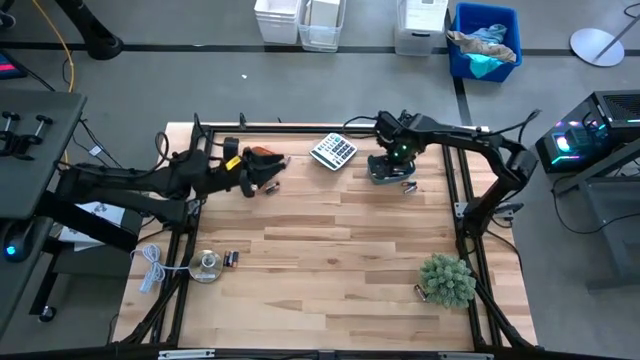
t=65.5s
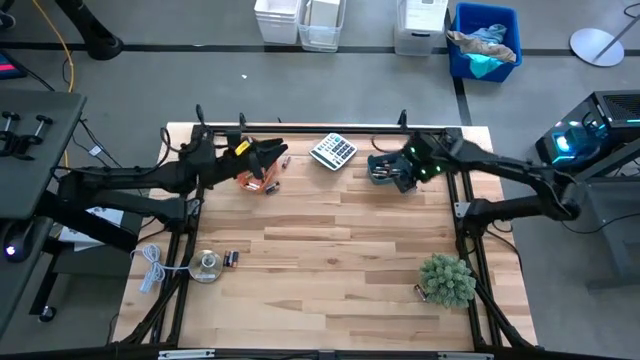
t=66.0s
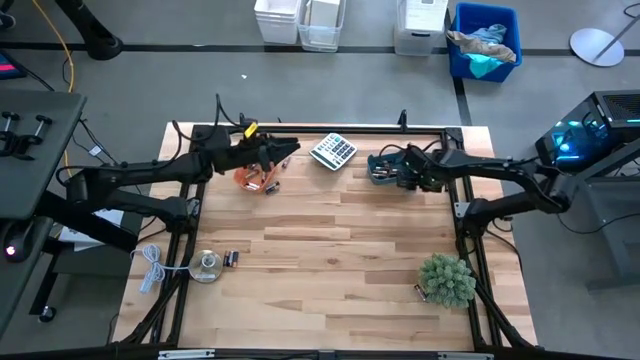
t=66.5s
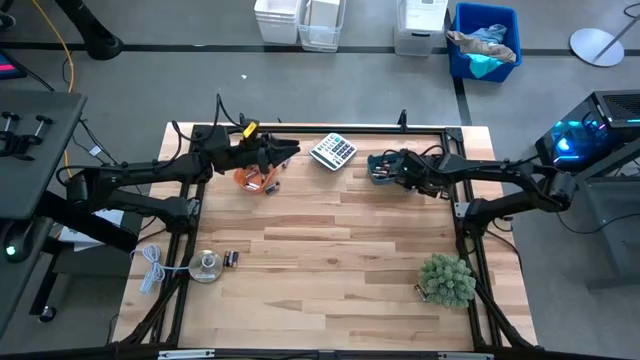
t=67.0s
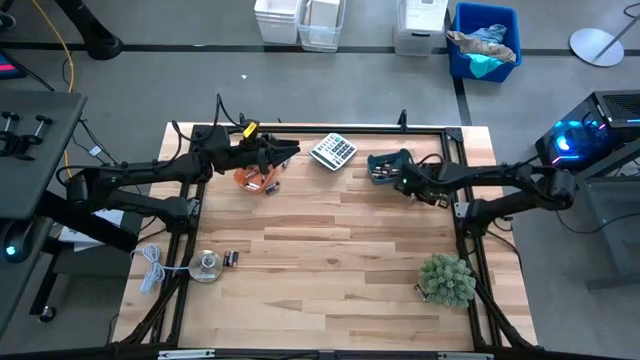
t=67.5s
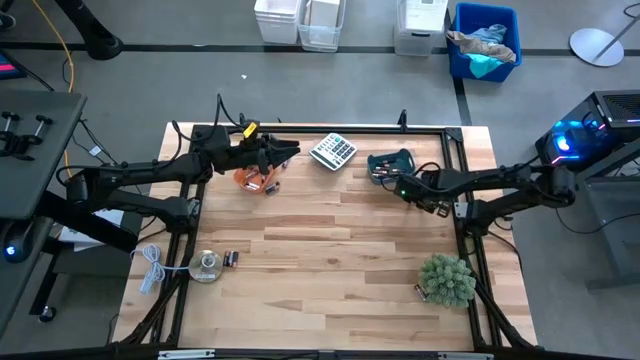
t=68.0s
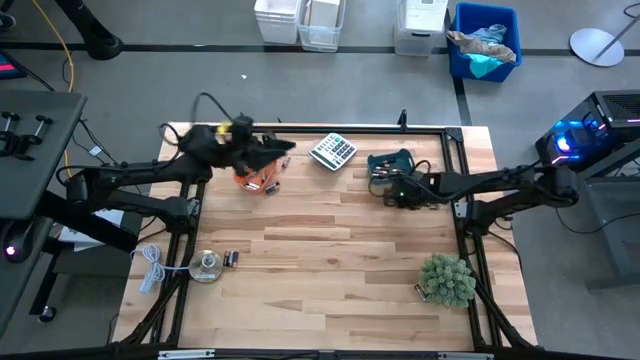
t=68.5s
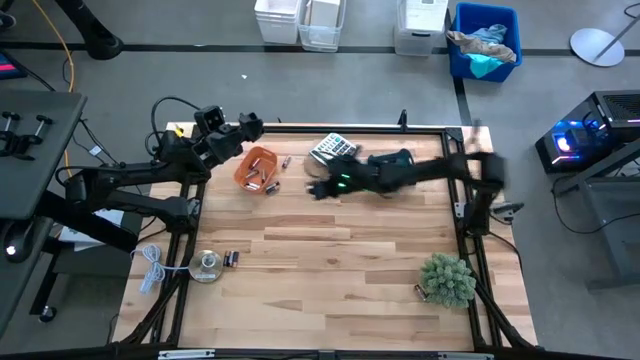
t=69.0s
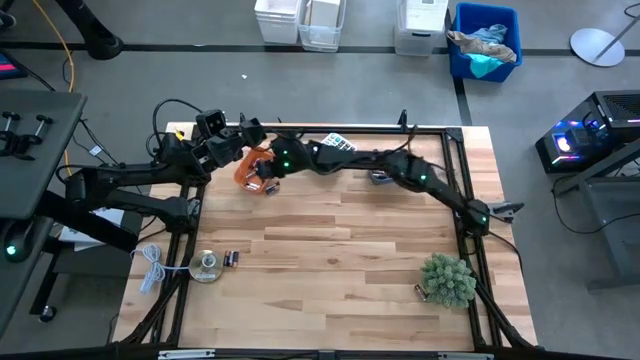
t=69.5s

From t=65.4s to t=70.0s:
Task: Sort batteries
Put the silver battery into the orange bin

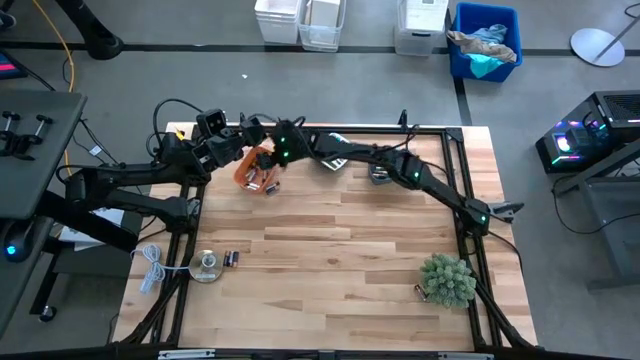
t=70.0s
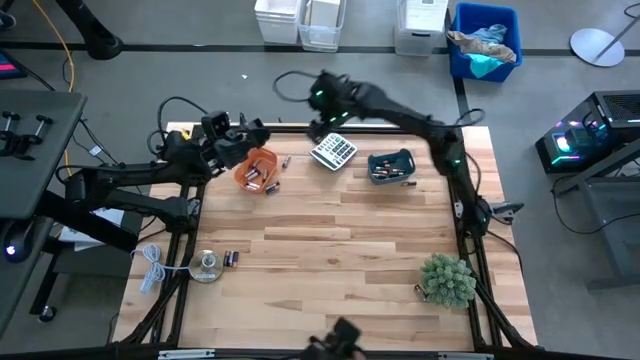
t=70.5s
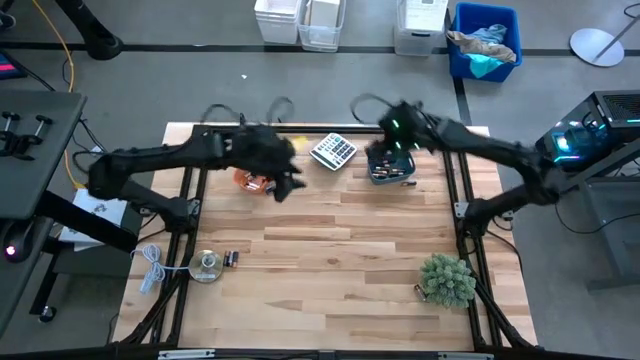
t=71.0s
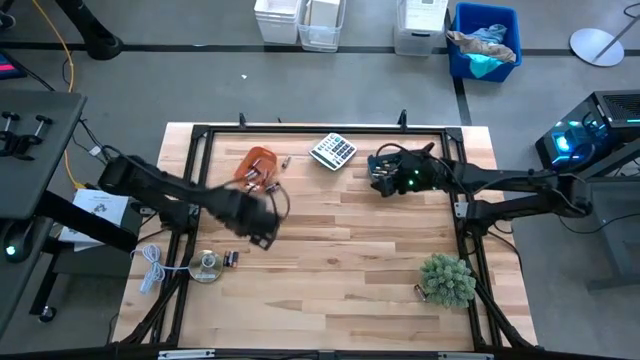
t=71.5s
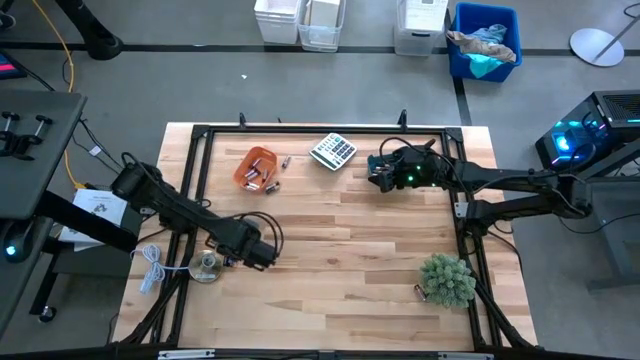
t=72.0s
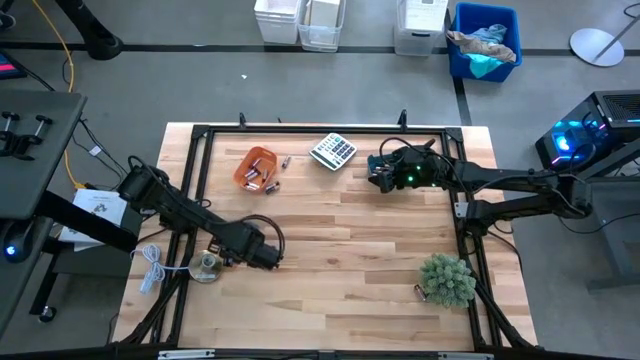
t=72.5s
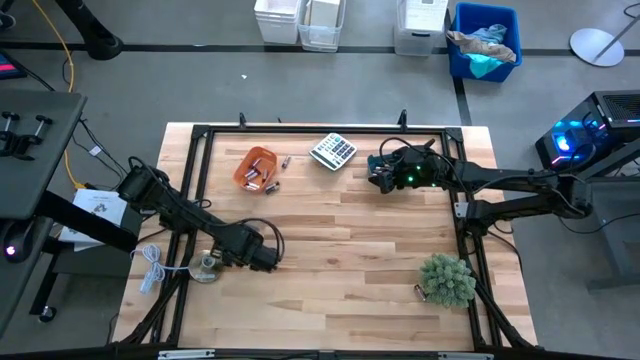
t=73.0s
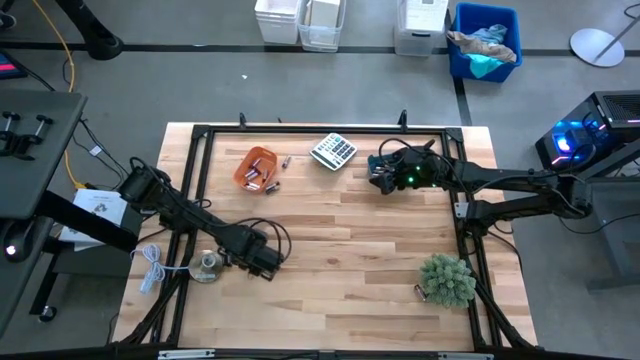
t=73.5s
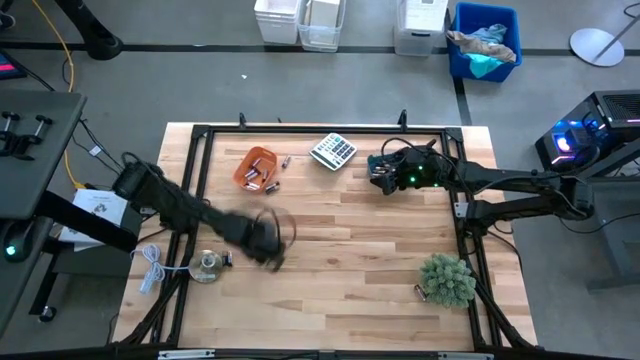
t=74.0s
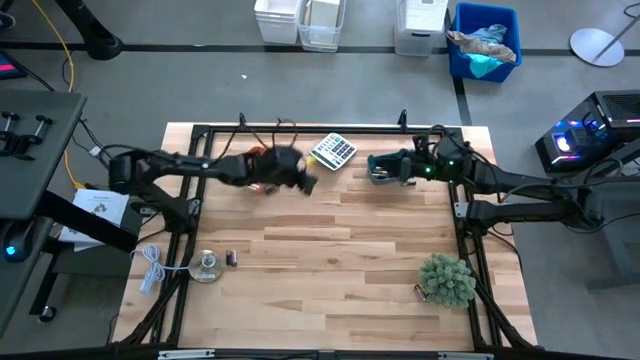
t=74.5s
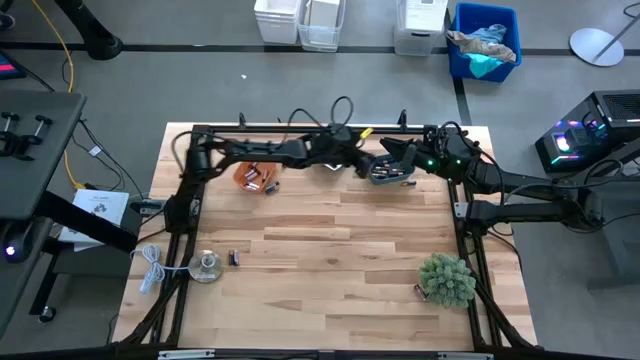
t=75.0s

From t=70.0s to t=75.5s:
Put the golden battery into the blue bin

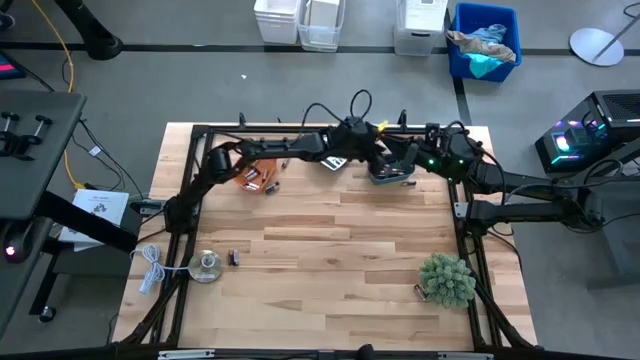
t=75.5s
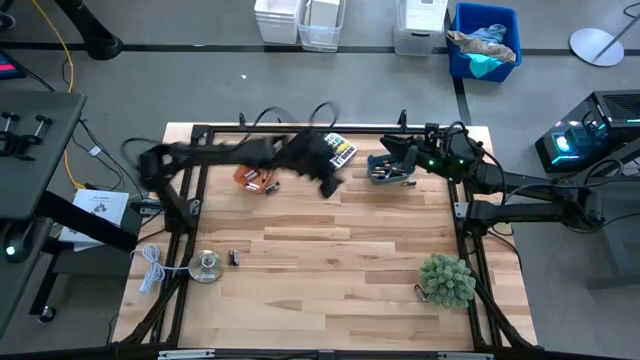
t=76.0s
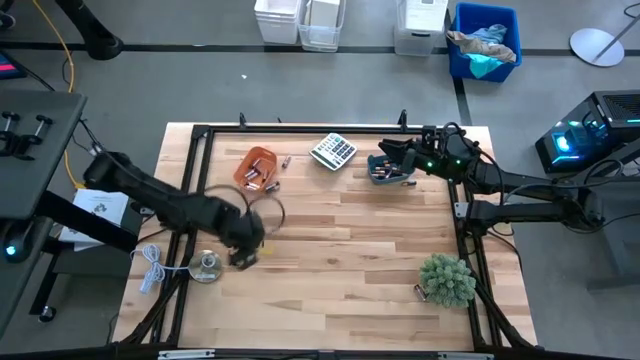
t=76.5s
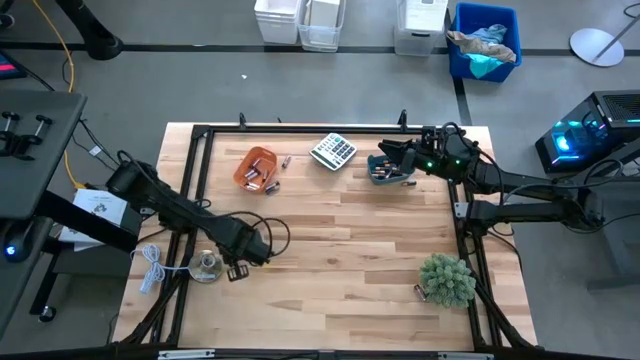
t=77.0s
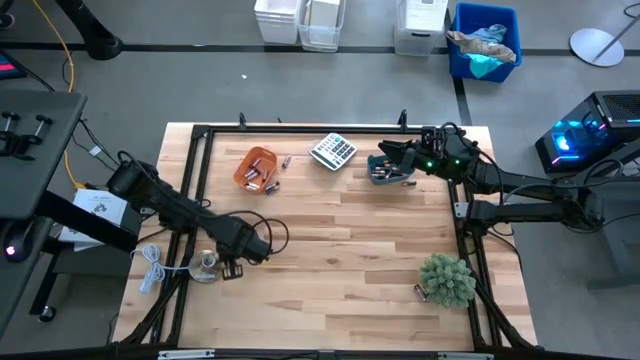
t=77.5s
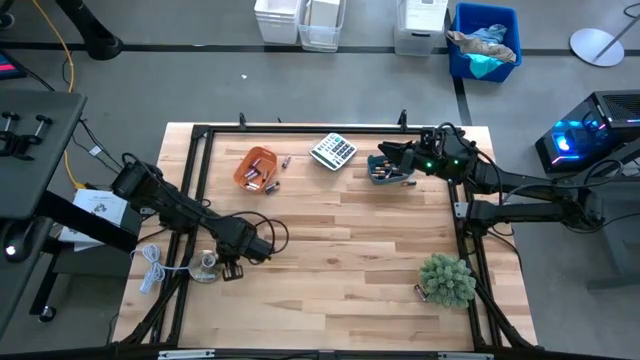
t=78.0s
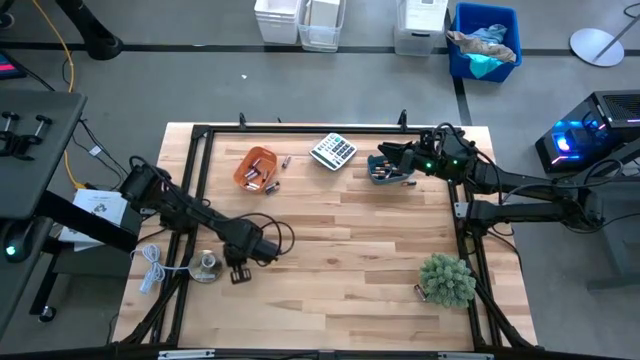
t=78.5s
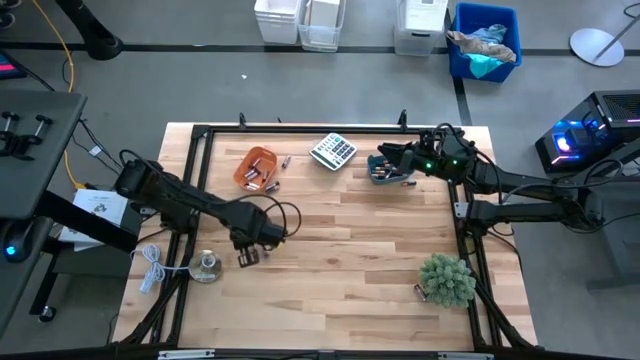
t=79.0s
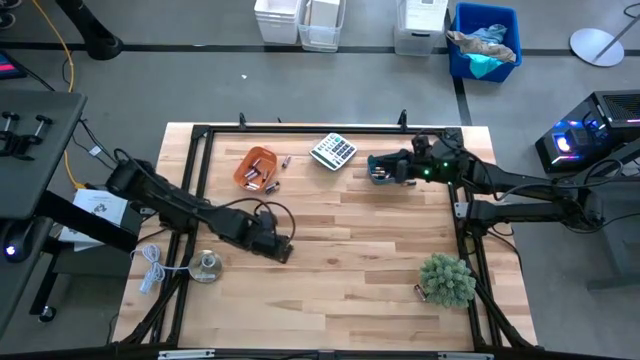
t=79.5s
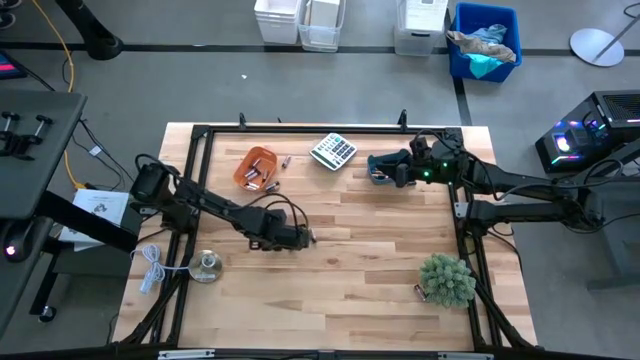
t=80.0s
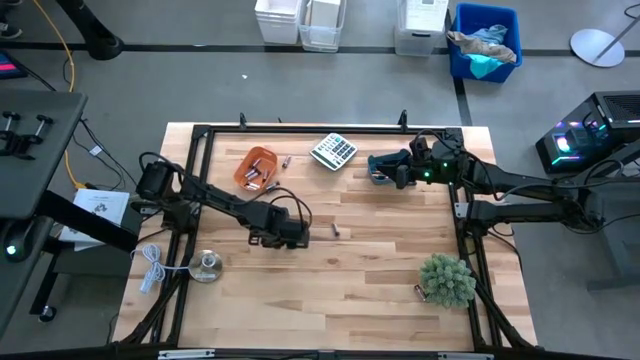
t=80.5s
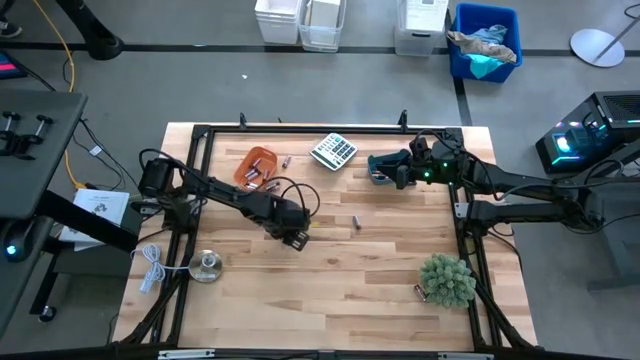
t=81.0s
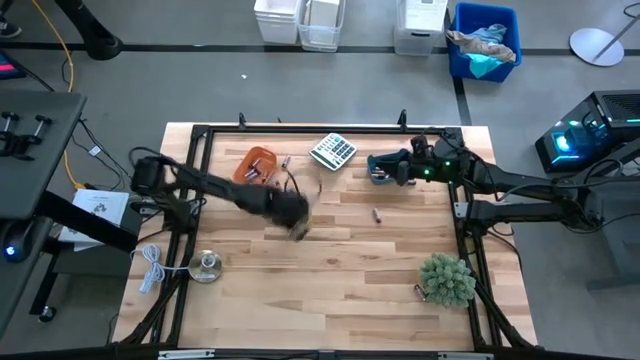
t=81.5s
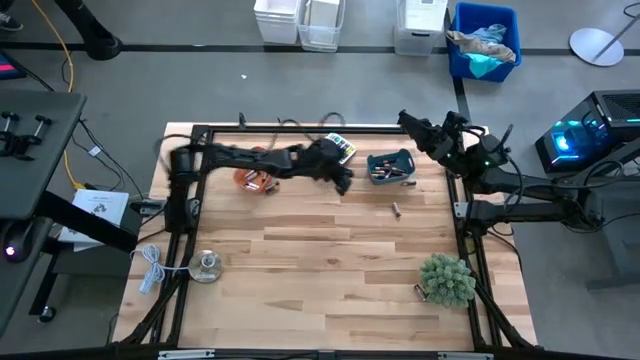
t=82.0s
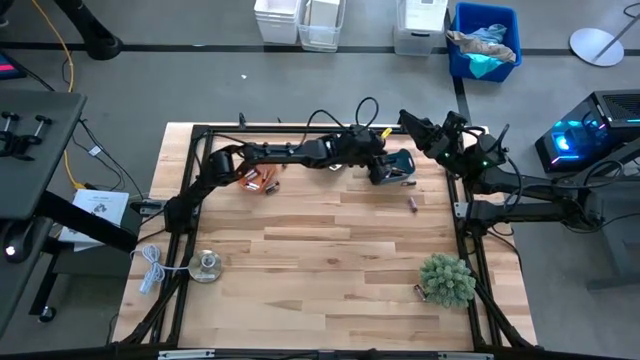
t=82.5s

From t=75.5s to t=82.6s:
Put the golden battery into the blue bin

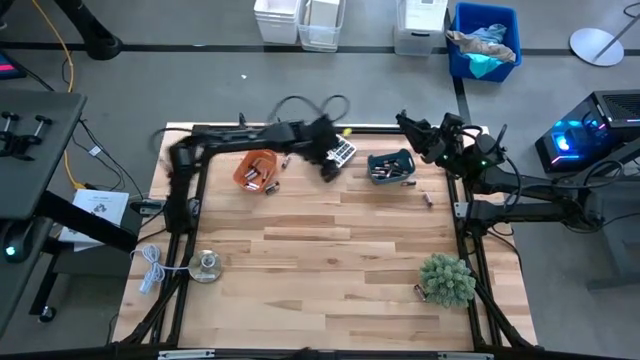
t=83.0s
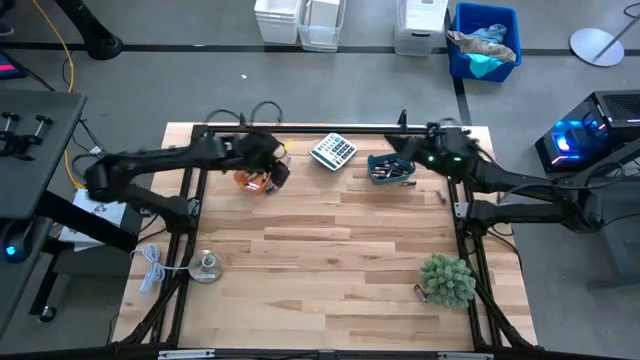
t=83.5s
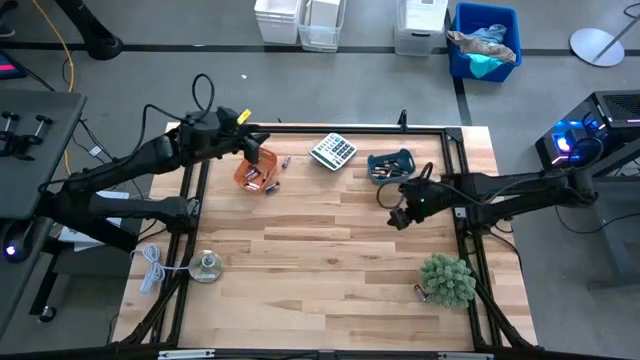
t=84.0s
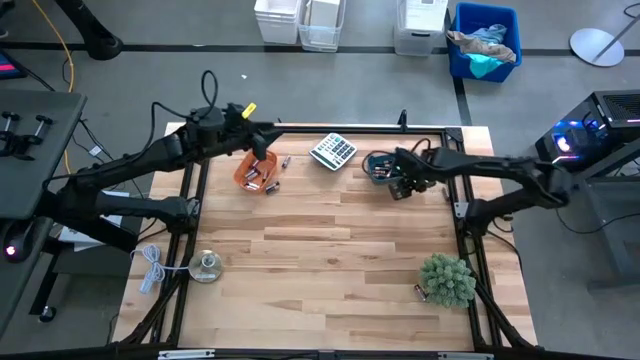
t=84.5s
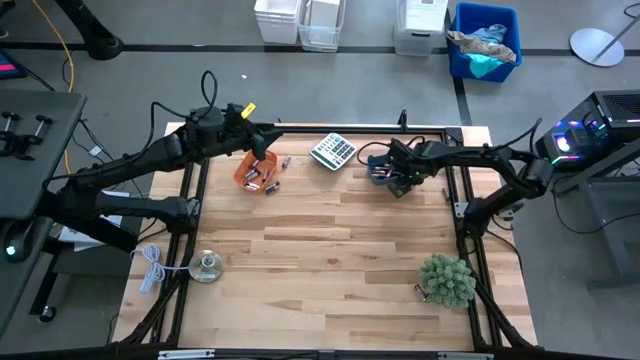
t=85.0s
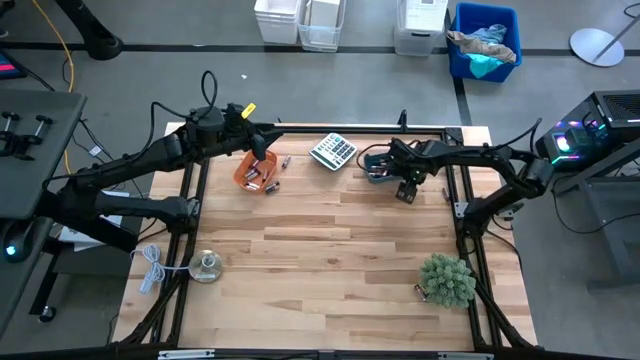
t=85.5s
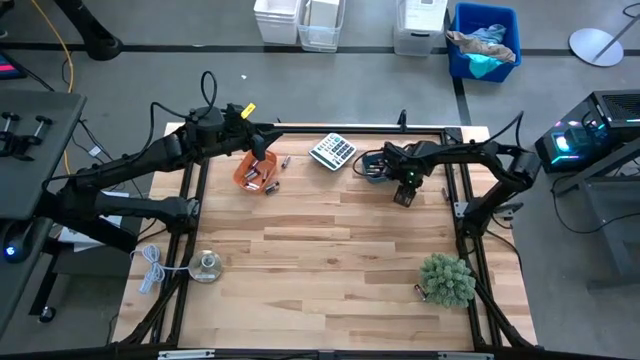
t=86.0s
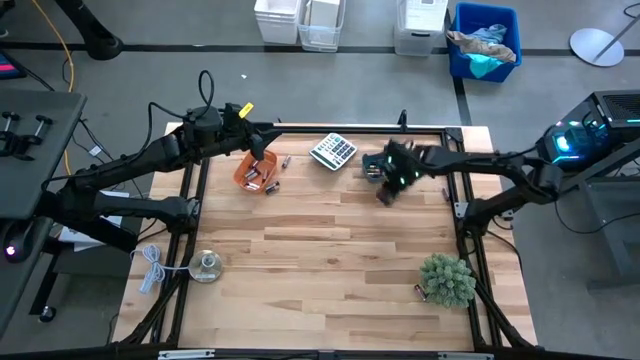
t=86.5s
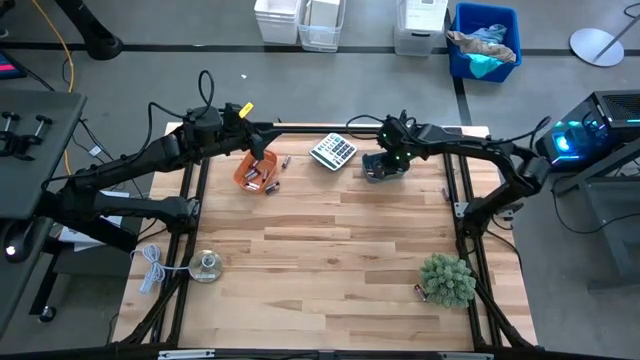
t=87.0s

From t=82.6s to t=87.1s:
Put the top right golden battery into the blue bin
